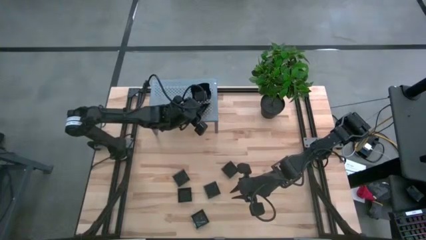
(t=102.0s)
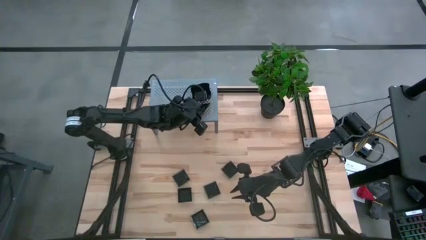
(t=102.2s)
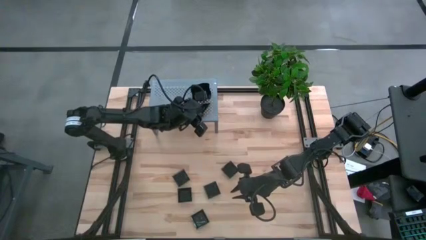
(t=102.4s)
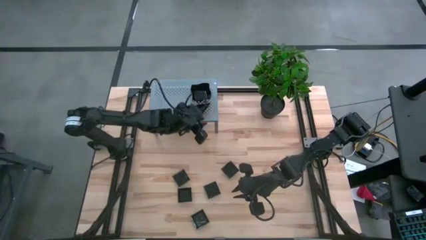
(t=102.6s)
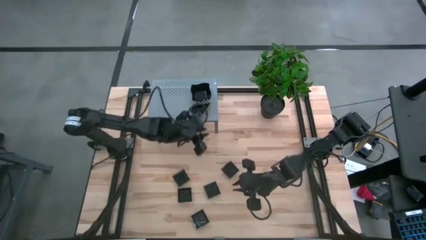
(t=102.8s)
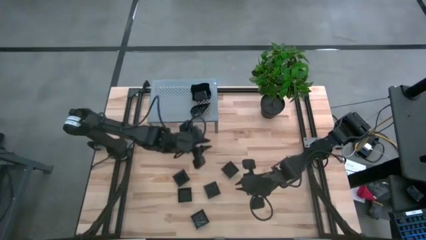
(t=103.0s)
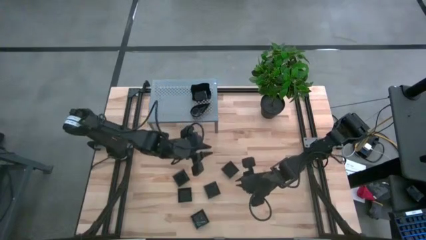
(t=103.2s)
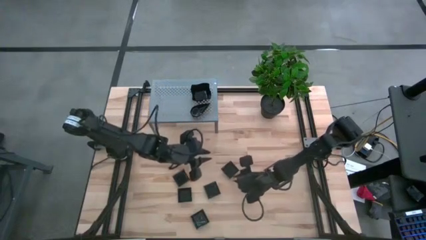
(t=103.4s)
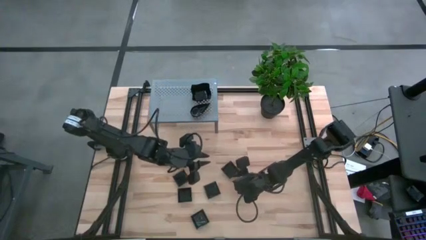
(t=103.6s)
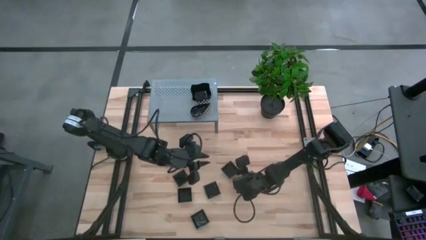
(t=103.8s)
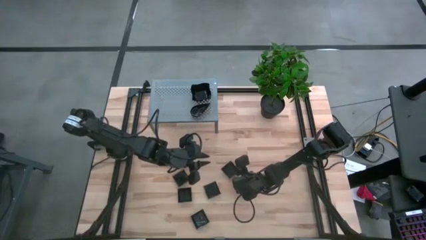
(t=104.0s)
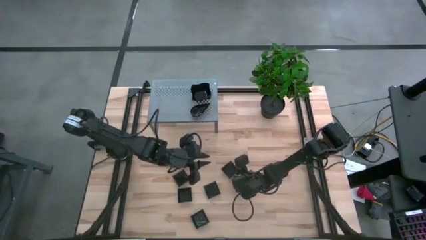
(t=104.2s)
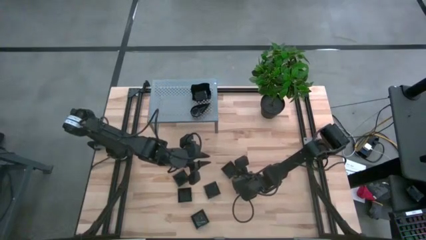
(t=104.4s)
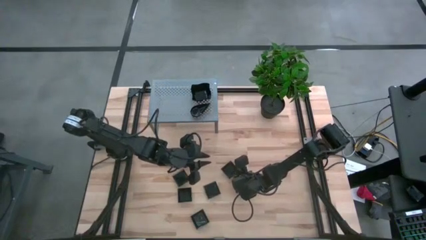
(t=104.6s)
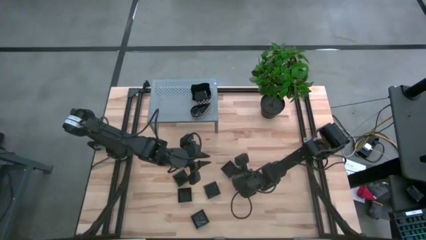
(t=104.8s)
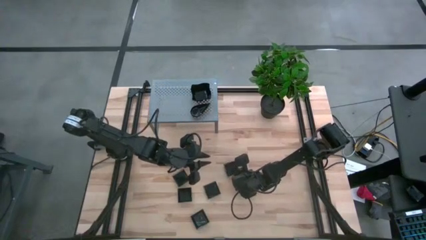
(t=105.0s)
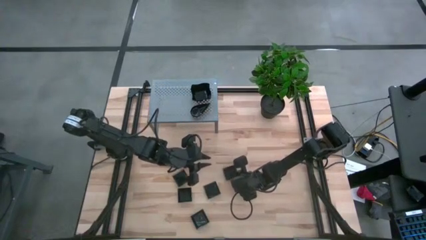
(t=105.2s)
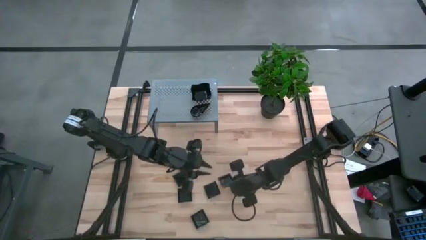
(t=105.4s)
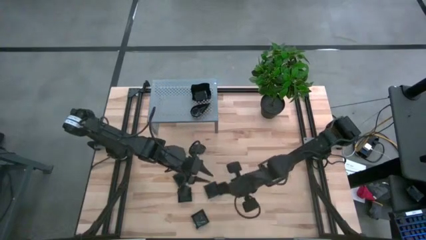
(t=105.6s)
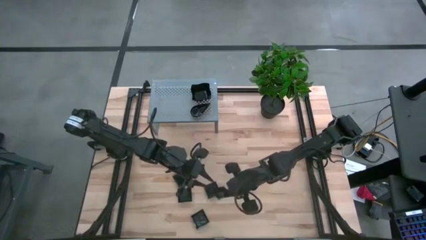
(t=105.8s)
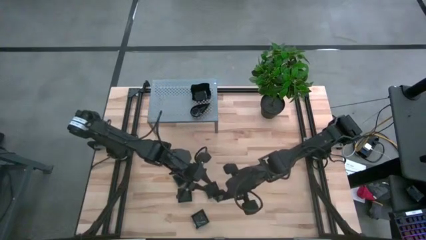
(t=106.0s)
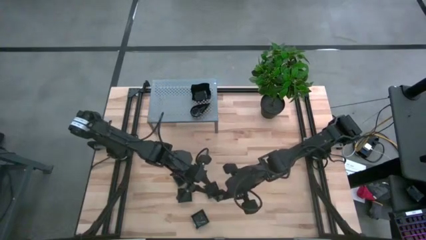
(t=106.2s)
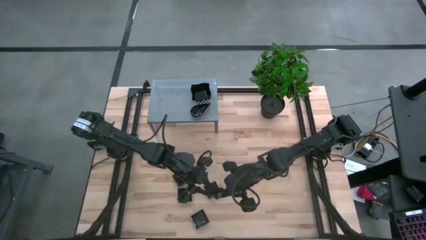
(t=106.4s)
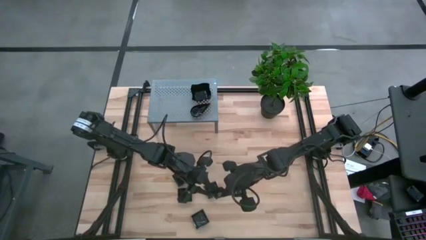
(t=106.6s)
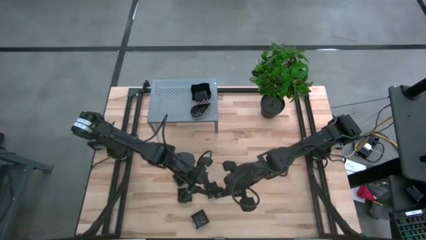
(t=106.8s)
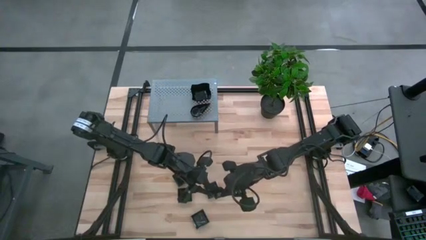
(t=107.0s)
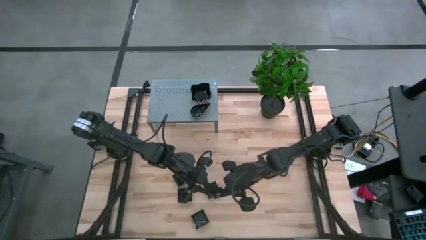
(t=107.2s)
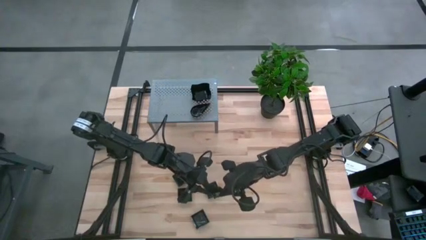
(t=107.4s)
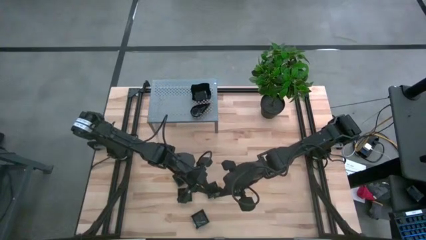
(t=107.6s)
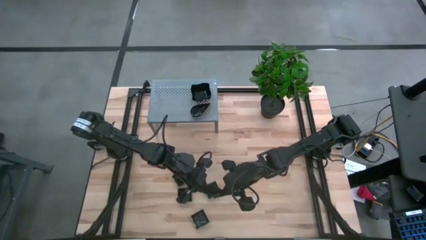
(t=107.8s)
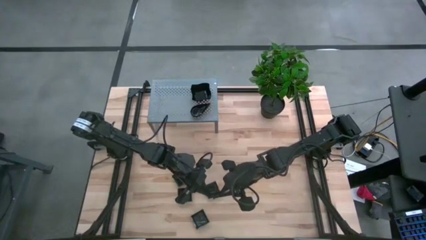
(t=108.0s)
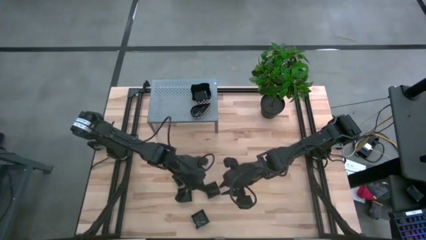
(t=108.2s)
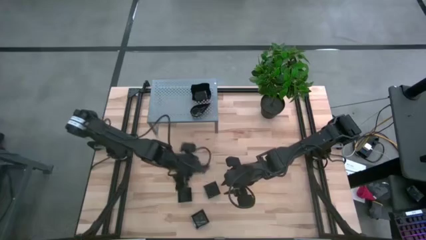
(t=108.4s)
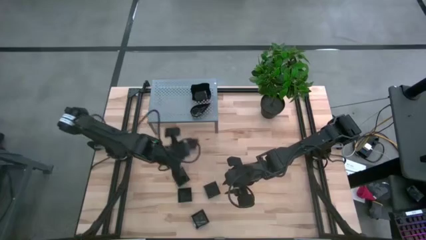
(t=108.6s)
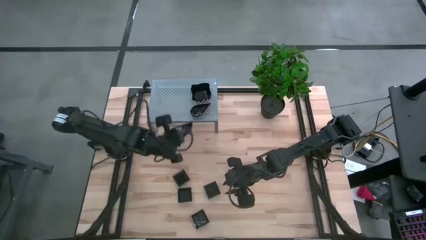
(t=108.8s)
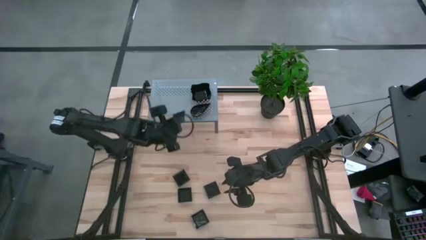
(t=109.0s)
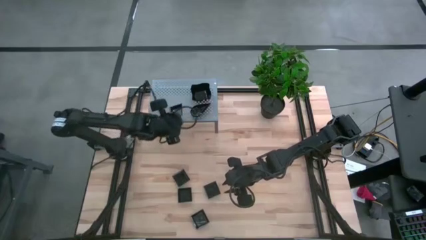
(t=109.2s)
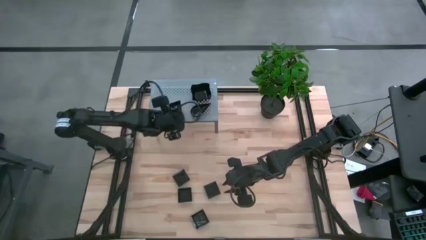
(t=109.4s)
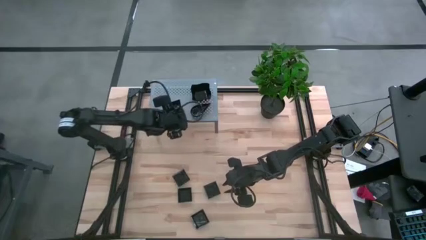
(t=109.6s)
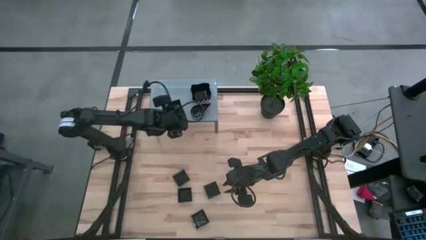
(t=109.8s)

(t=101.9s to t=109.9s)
Task: Pick & Place Mini shaped plates
Put the square plate on the shelf

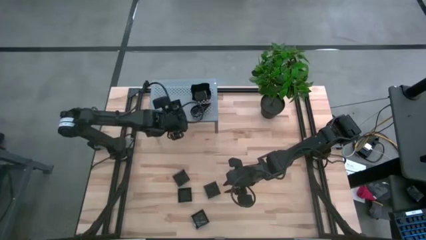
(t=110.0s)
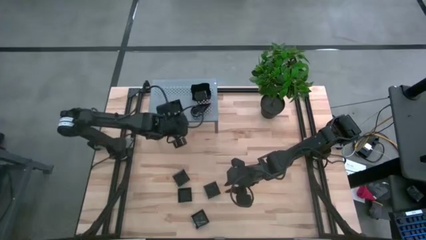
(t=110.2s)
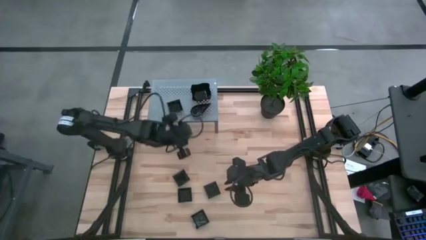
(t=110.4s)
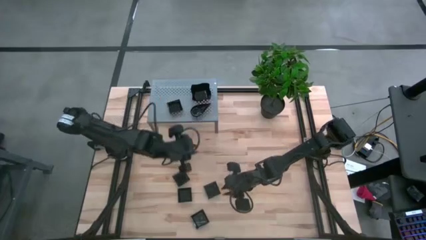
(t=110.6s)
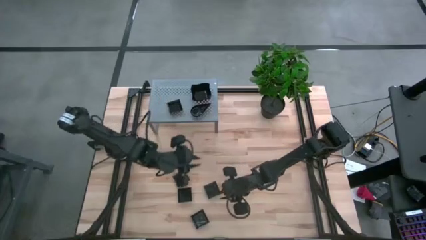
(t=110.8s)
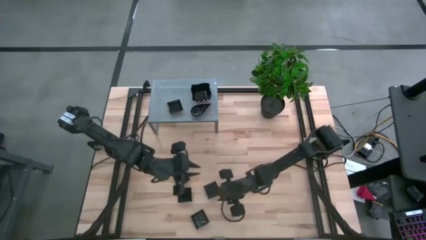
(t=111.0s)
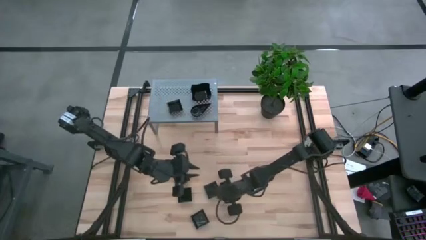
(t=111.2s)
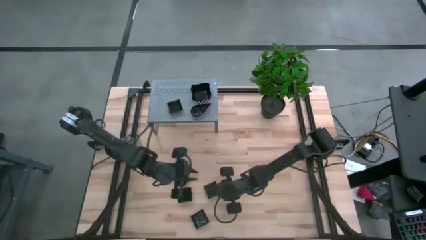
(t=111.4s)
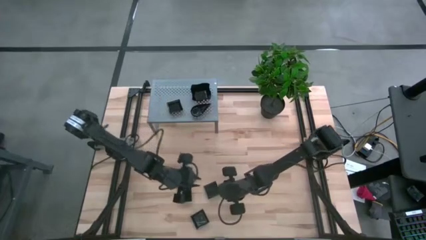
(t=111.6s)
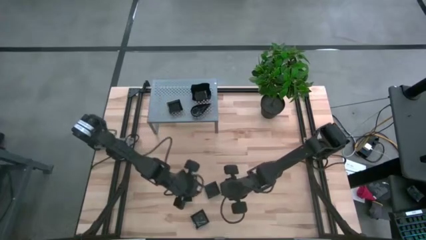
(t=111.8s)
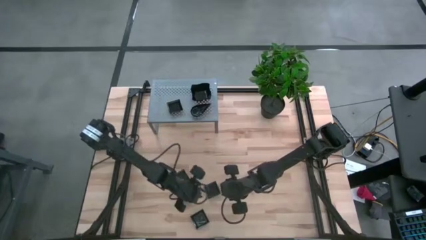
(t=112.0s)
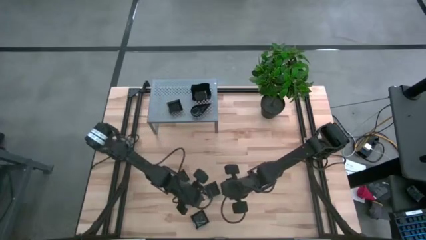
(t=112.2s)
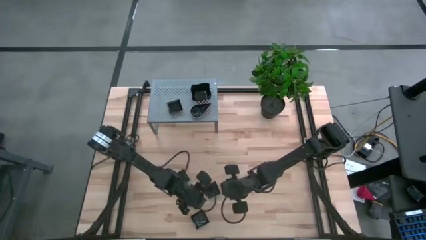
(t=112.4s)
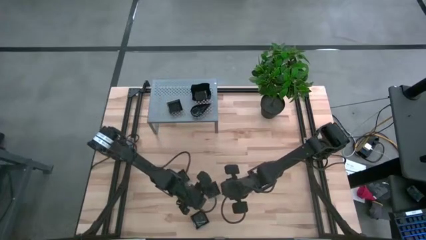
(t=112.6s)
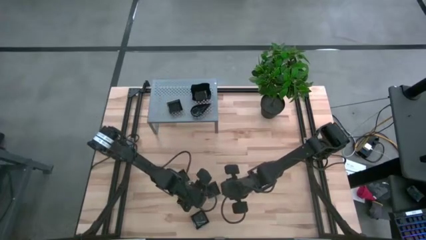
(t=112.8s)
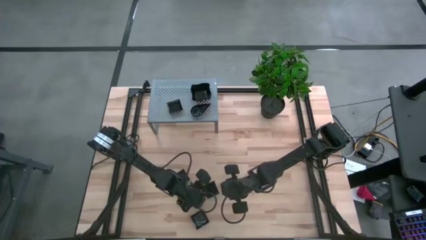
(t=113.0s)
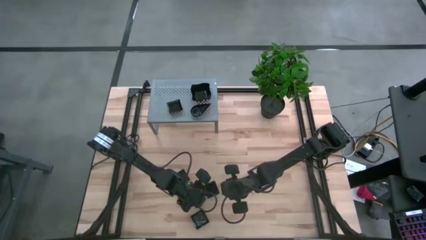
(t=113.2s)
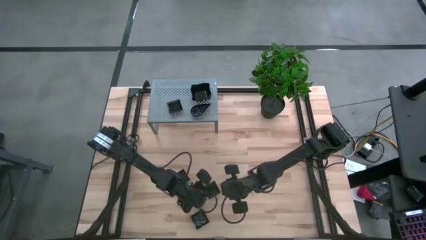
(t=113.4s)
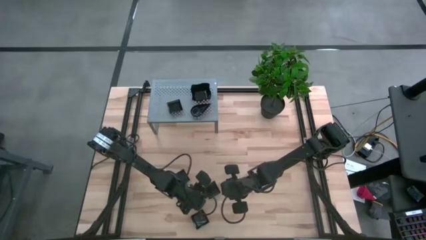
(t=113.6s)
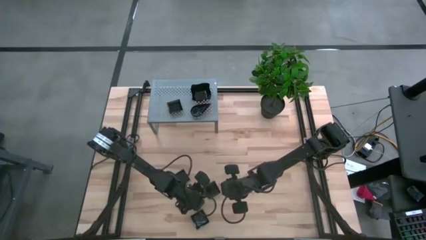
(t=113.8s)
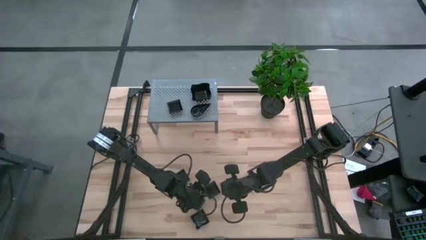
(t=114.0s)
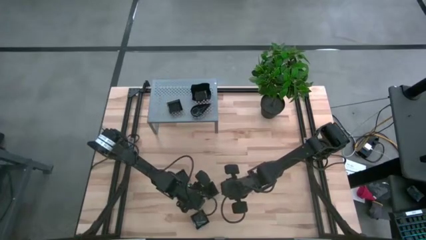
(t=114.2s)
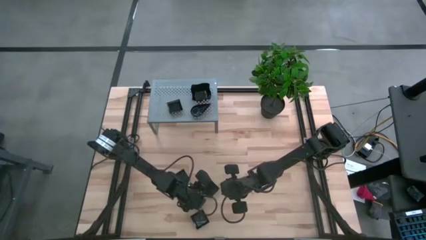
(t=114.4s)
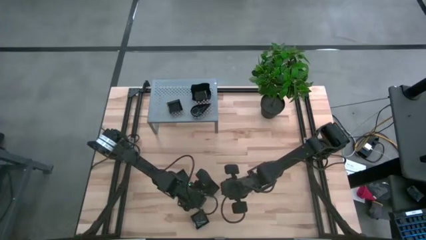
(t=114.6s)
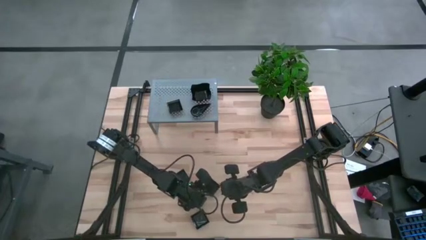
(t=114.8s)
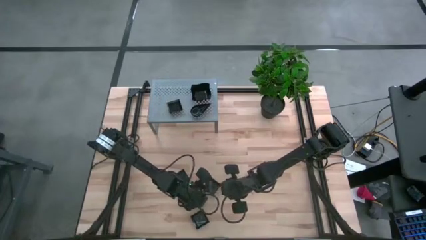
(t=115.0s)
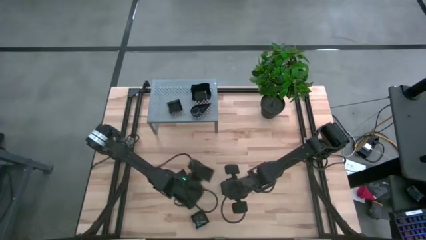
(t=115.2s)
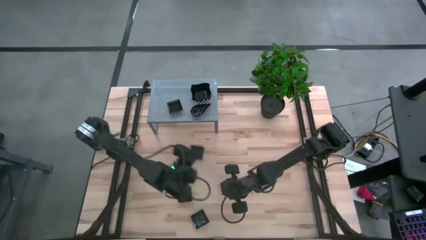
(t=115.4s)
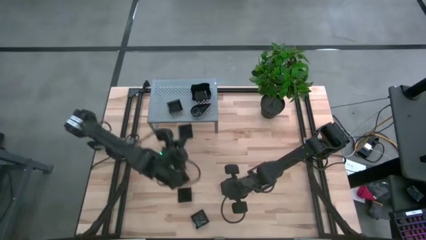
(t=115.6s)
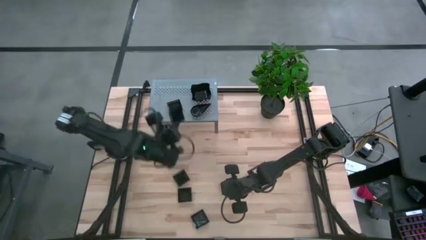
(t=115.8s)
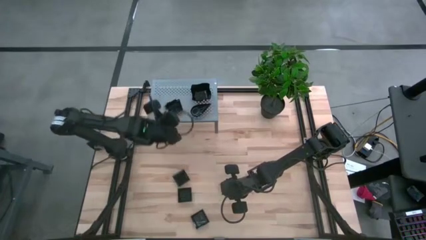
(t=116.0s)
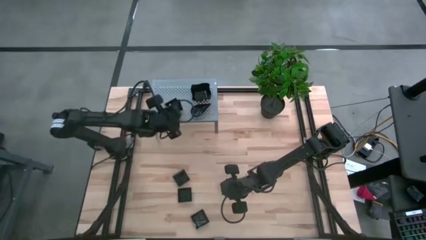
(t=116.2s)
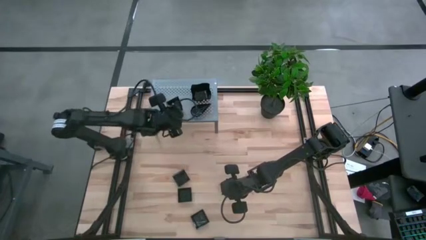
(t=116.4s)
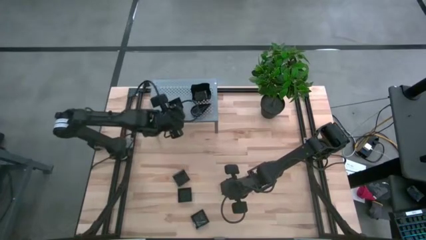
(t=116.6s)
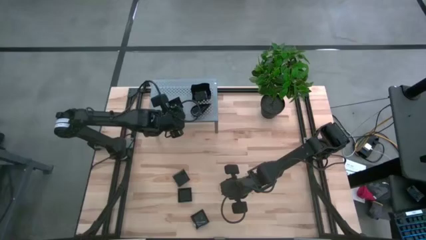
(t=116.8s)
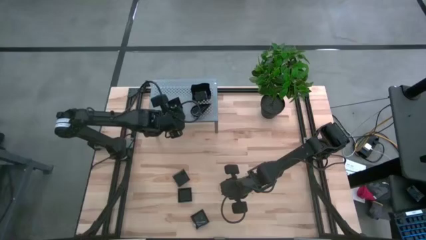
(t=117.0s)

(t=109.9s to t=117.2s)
Stack the square plate on top of the square plate on the shelf
